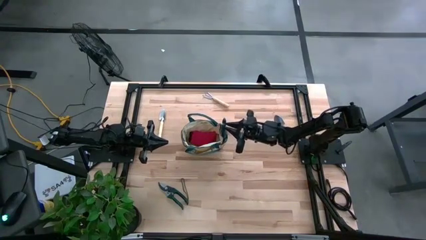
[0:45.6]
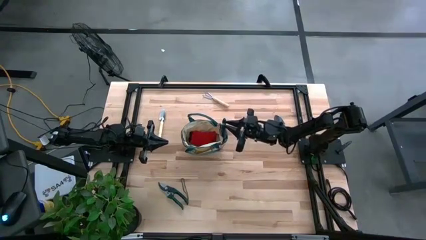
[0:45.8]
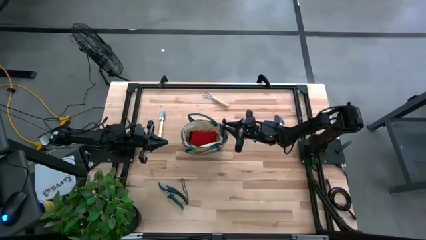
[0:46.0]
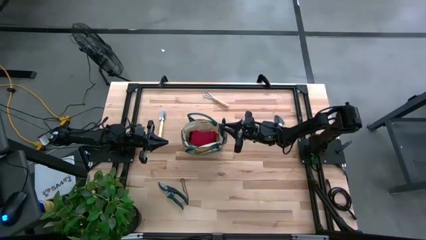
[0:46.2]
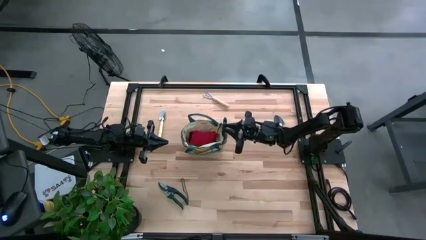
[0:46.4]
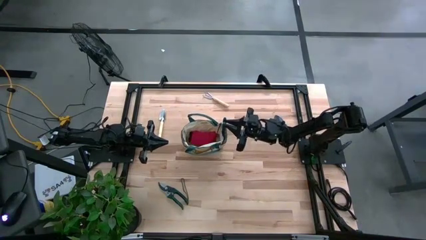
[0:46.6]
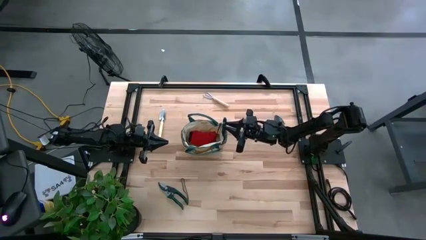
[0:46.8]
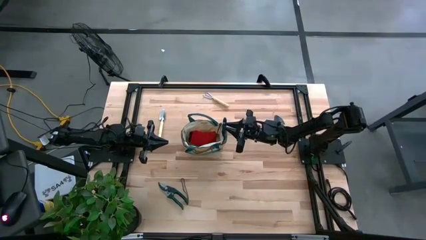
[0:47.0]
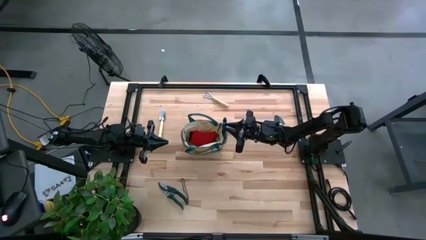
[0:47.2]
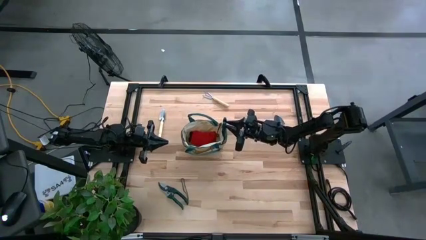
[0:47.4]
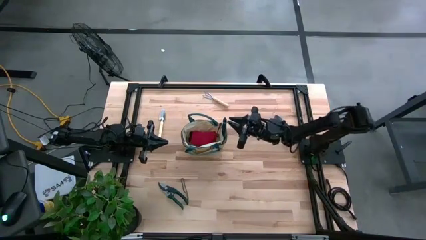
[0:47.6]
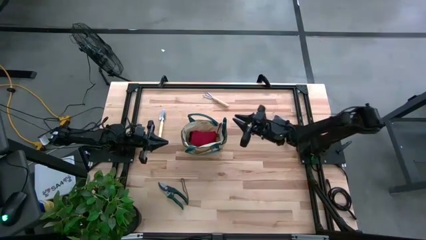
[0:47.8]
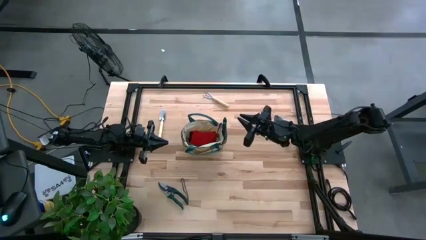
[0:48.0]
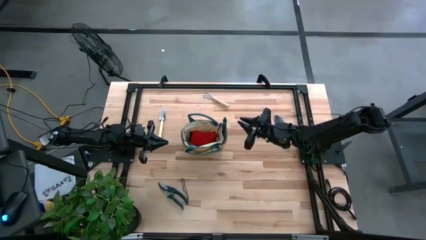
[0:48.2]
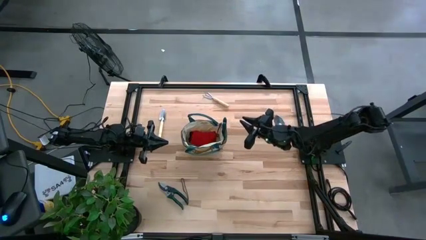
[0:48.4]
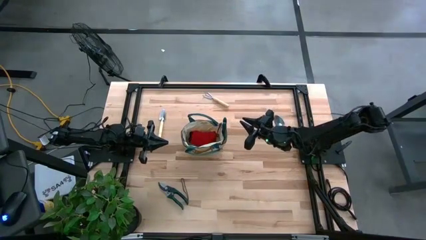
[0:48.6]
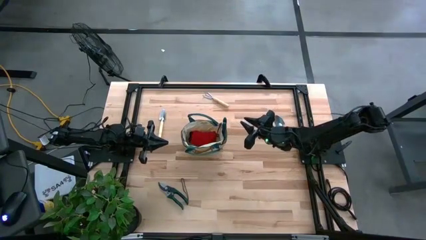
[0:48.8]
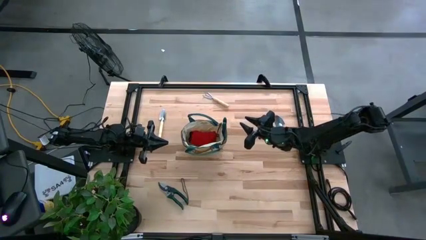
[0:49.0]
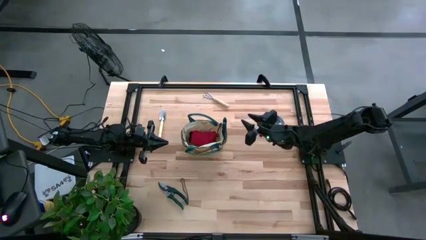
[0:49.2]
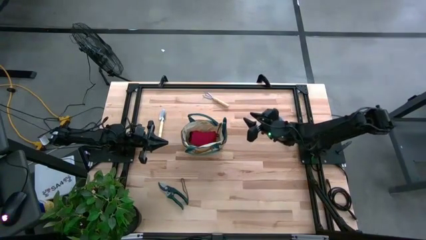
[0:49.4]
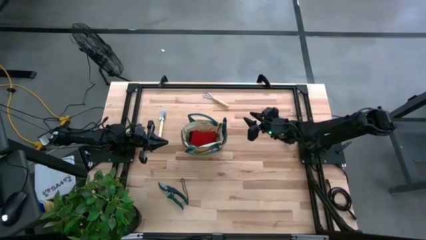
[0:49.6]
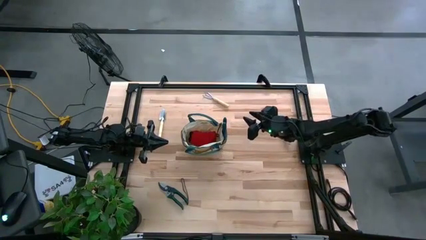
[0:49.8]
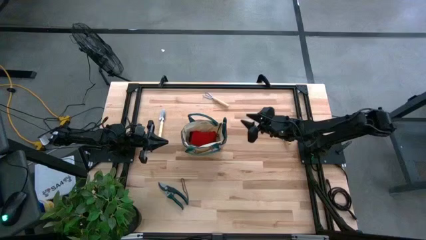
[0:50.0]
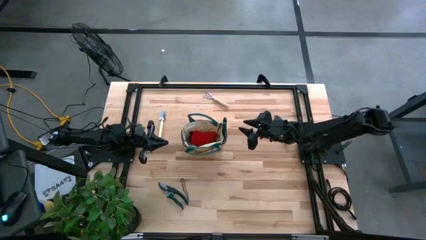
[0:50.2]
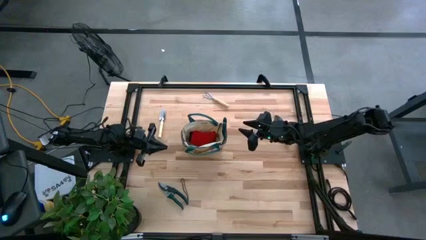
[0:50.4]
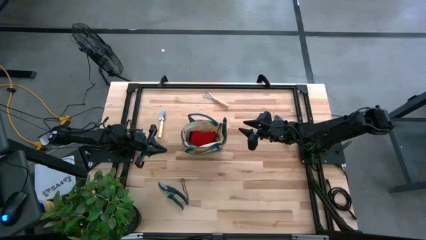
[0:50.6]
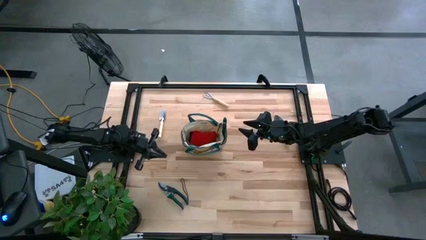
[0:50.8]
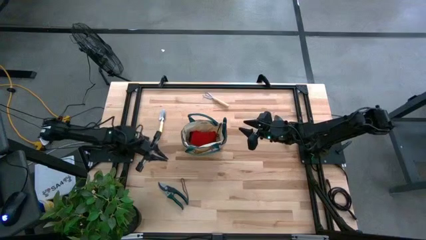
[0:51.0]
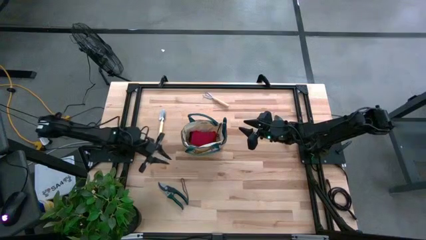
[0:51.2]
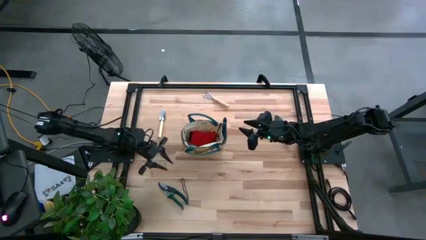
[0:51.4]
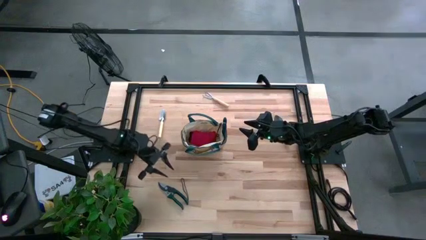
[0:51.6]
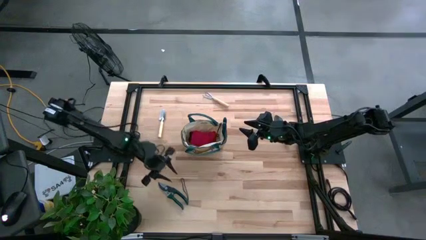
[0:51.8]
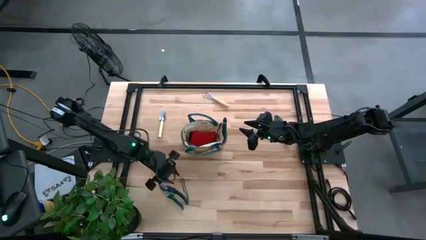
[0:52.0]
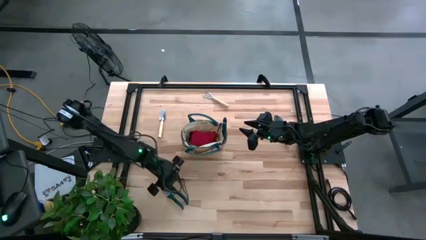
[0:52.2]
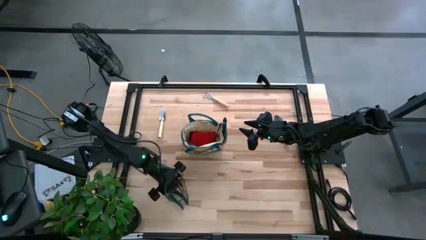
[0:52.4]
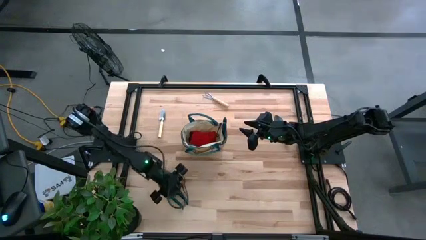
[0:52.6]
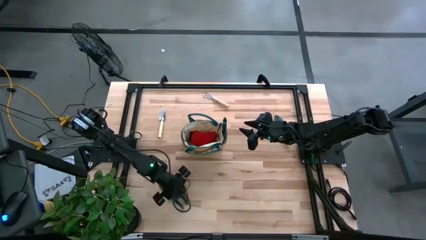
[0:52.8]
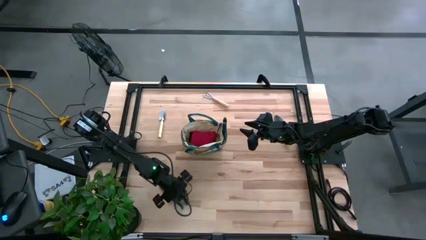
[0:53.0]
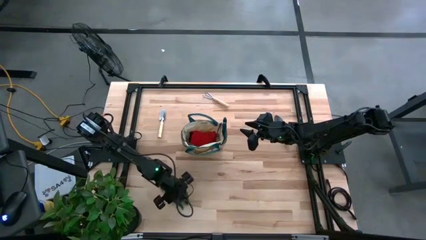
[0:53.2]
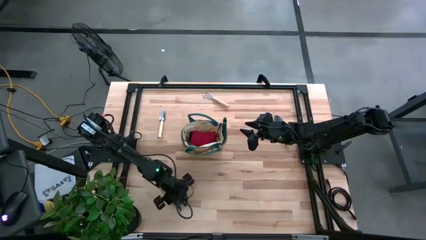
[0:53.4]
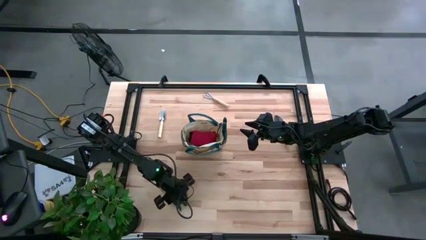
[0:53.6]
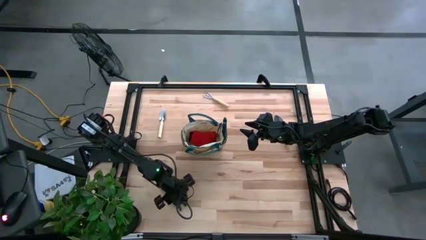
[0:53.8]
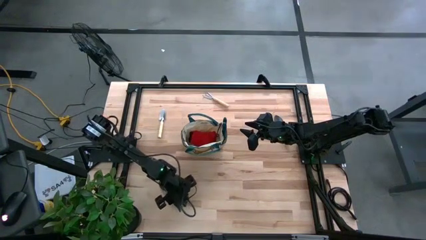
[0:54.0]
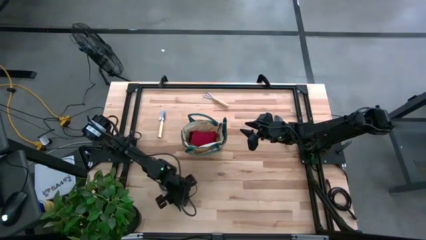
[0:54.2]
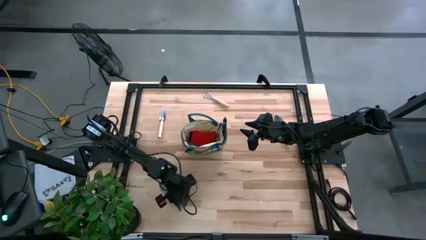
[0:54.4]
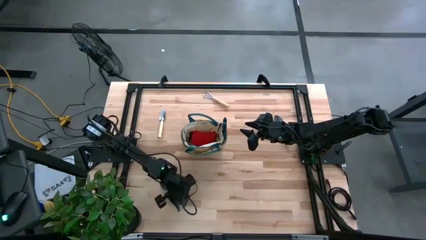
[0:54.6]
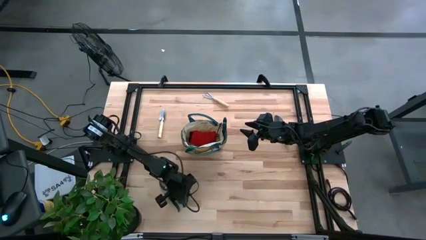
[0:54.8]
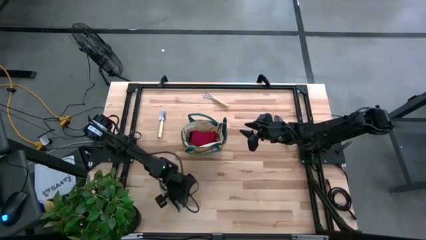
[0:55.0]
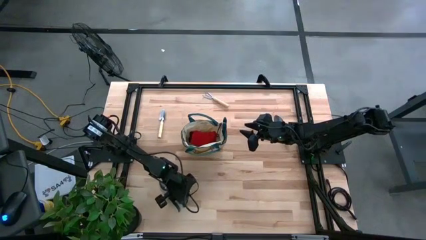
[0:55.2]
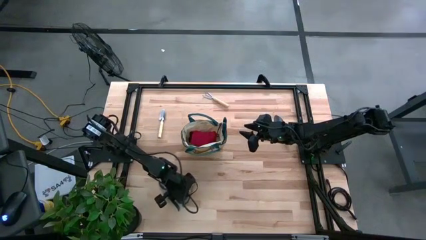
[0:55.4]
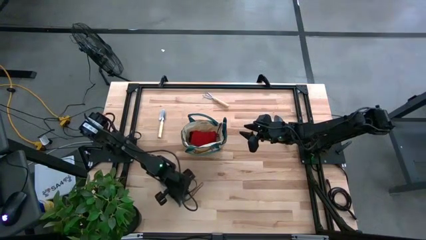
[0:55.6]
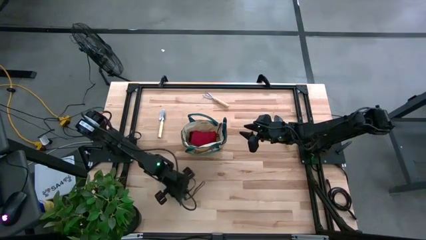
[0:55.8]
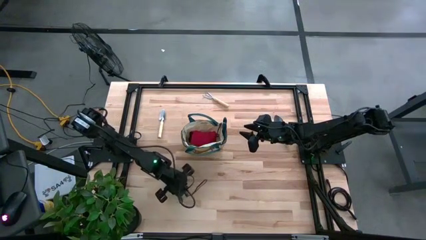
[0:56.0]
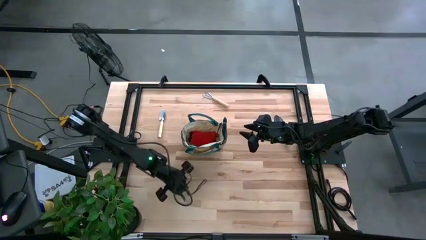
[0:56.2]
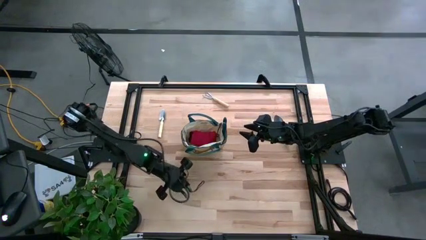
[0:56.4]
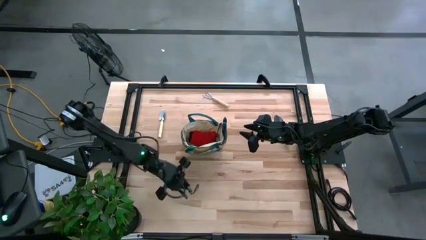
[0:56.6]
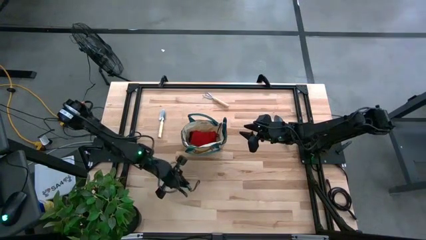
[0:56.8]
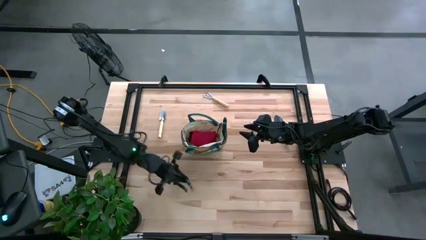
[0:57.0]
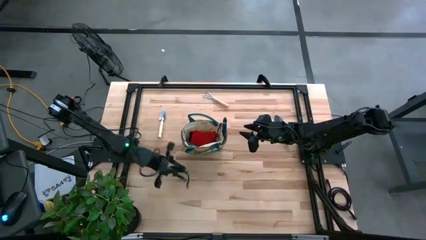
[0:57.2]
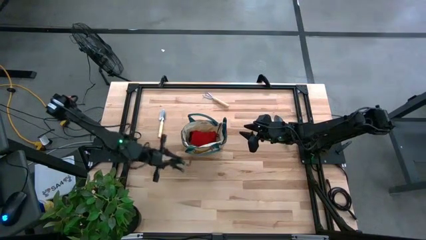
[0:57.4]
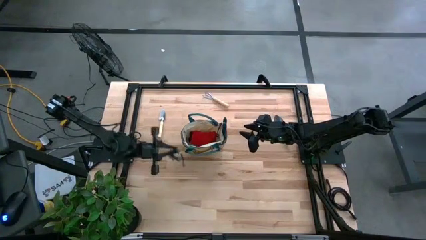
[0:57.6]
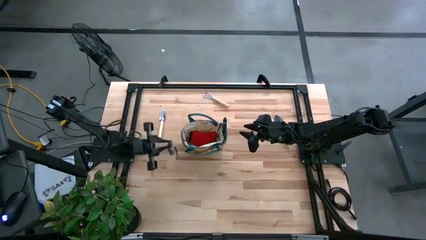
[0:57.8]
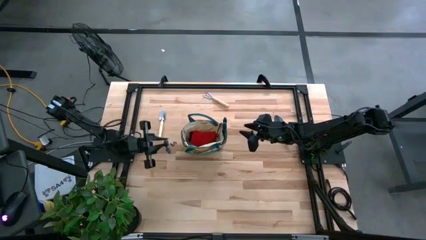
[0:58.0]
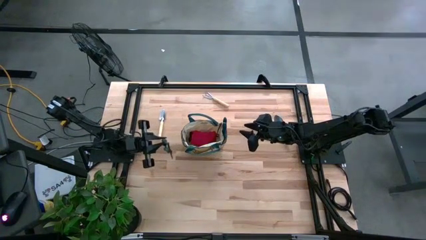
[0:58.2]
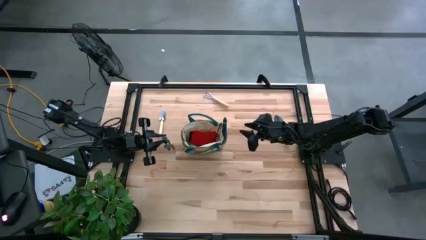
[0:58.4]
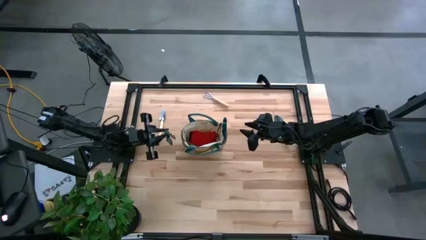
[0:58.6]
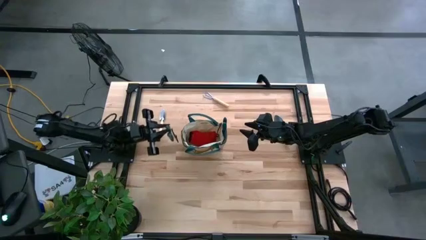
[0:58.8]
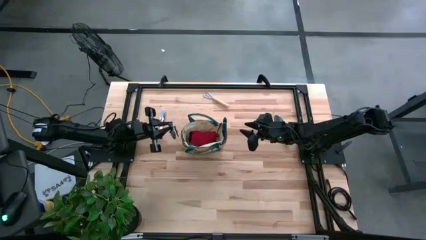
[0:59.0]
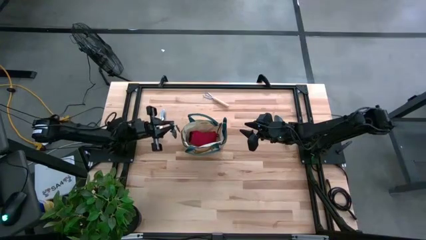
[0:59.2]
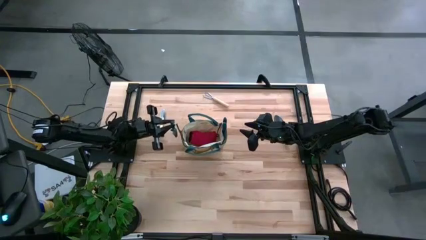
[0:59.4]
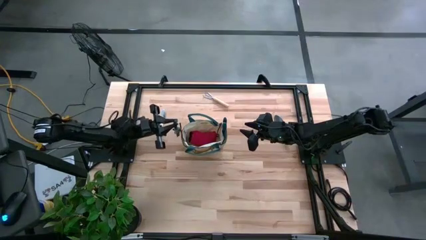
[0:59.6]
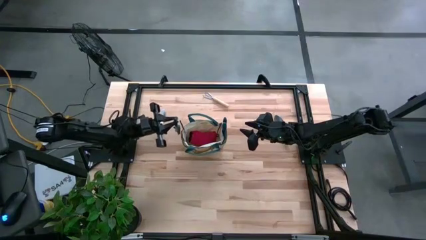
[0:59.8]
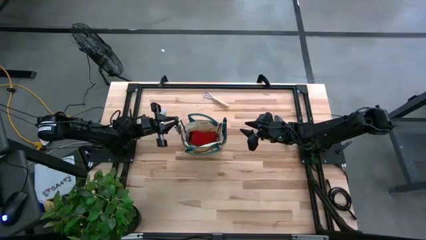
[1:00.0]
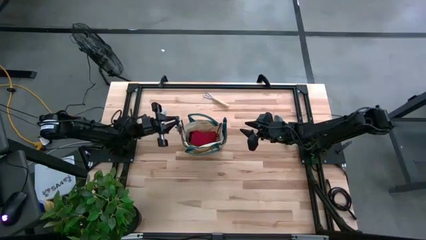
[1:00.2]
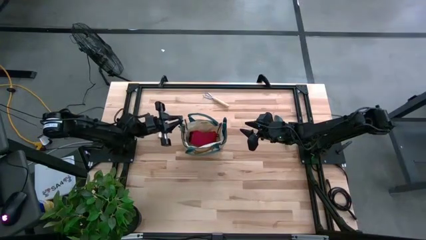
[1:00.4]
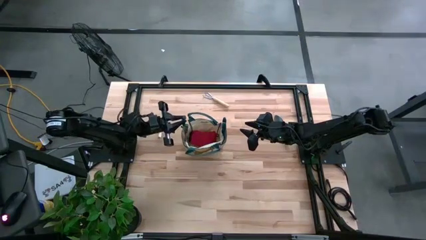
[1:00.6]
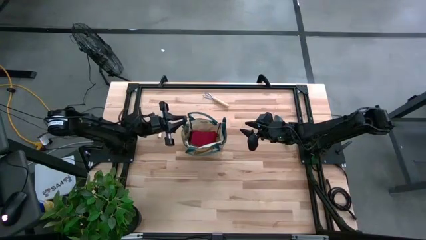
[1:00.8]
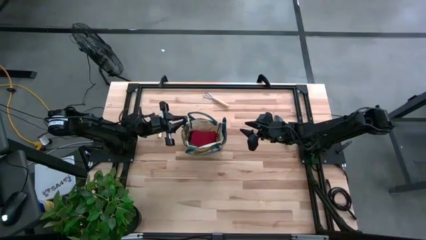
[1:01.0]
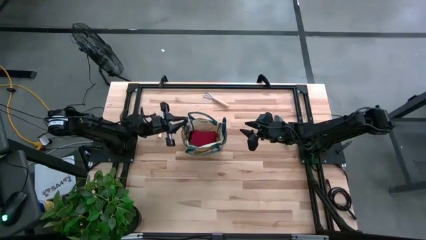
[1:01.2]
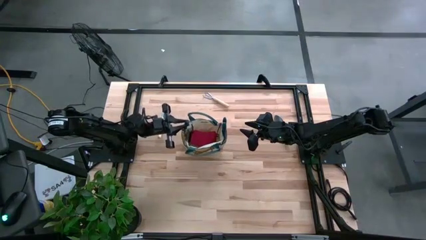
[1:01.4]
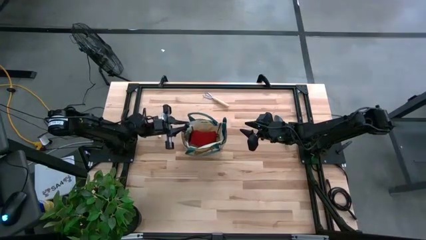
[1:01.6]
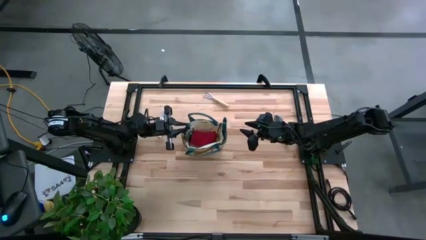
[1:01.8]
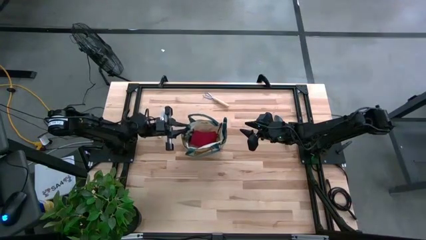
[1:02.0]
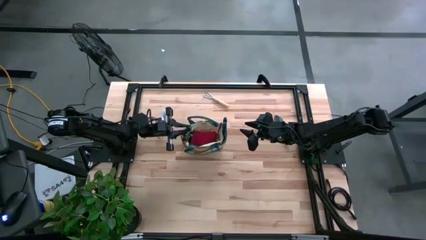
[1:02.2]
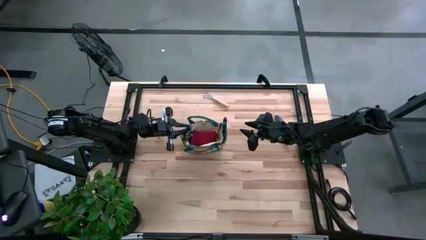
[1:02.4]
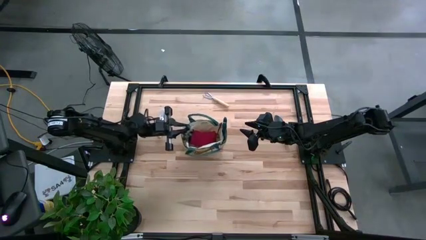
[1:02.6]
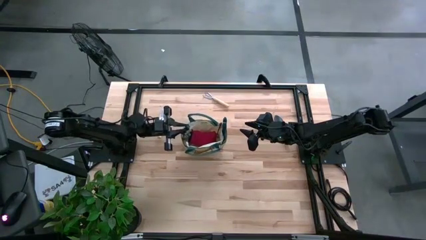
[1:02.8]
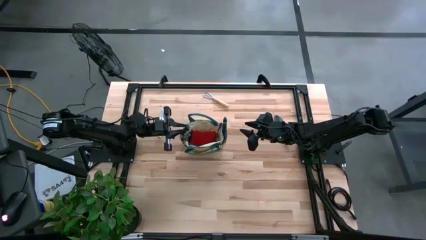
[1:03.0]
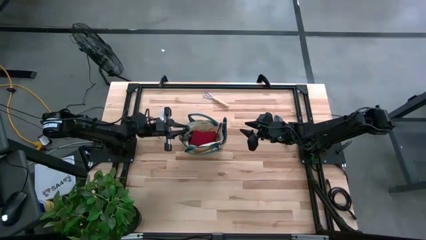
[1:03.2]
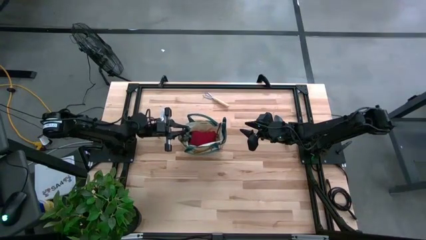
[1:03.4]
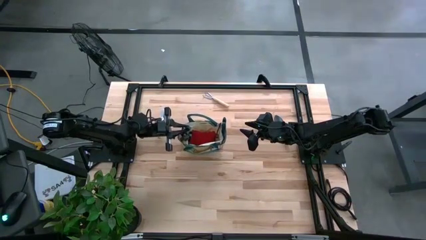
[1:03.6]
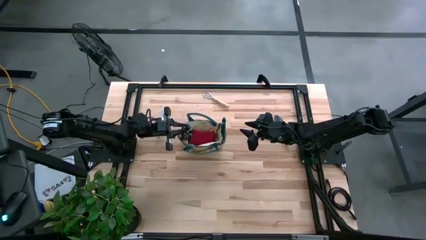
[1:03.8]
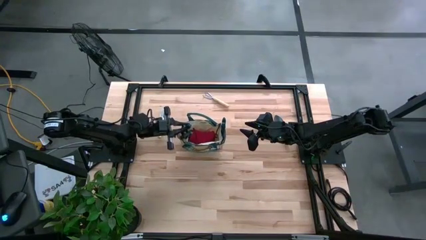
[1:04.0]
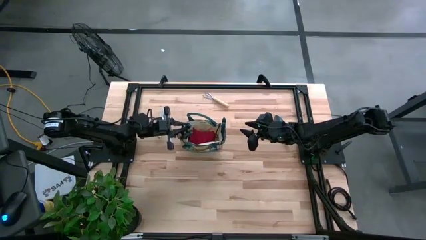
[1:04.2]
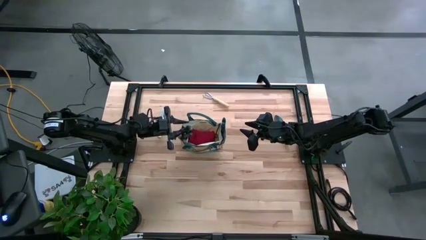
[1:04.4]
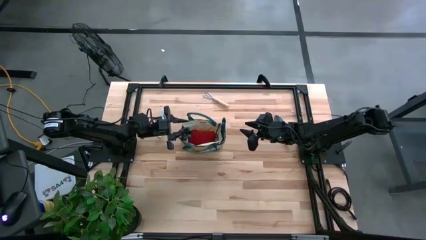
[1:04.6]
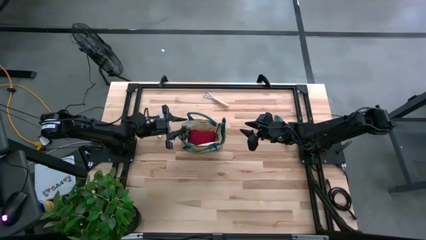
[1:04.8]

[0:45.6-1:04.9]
Task: Pick & Place Garden tools in Gardening bag
Put the green shear scissors into the light brown gardening bag
